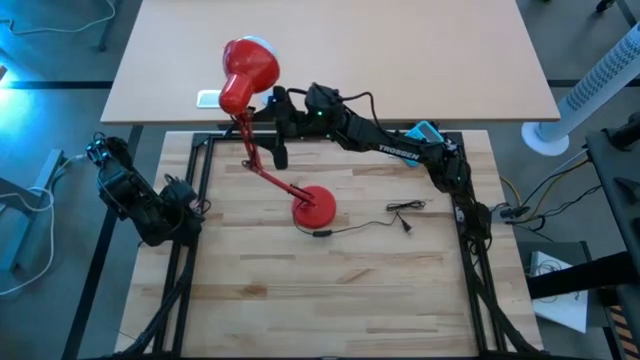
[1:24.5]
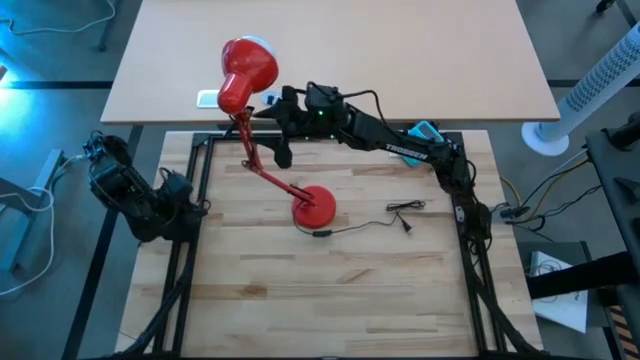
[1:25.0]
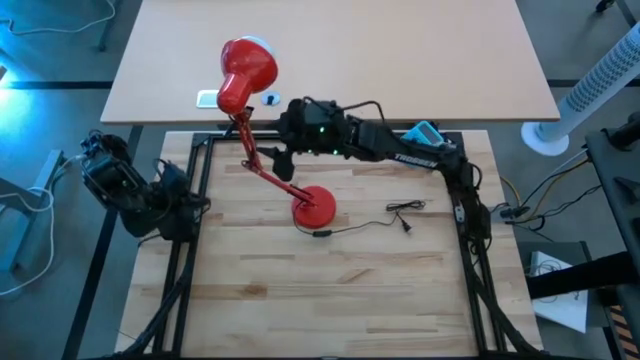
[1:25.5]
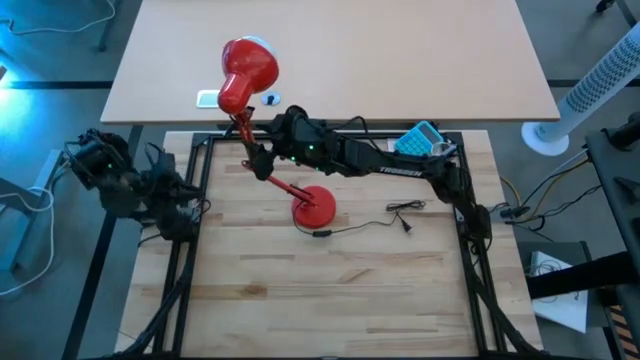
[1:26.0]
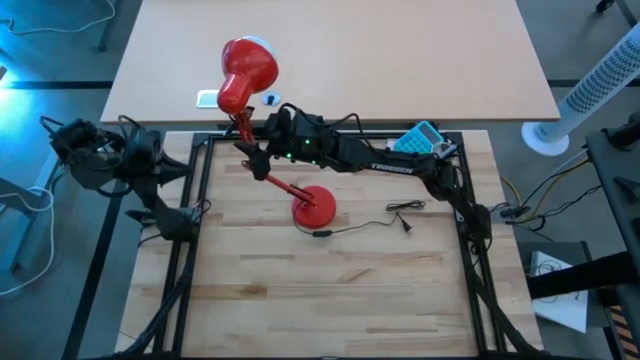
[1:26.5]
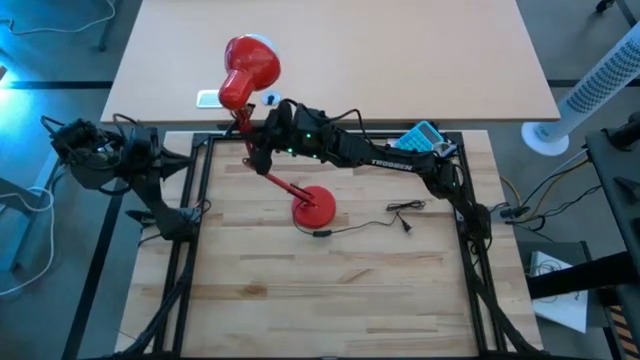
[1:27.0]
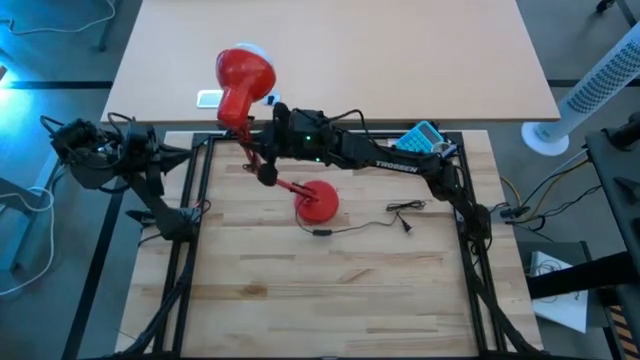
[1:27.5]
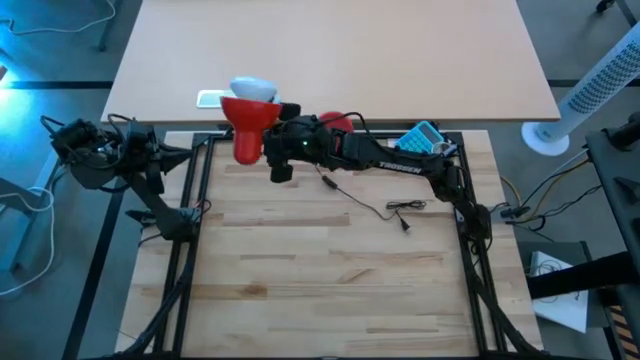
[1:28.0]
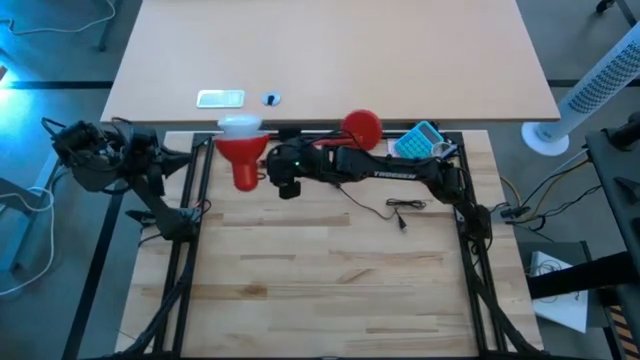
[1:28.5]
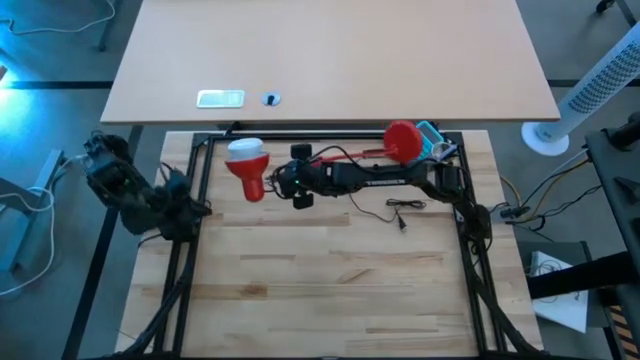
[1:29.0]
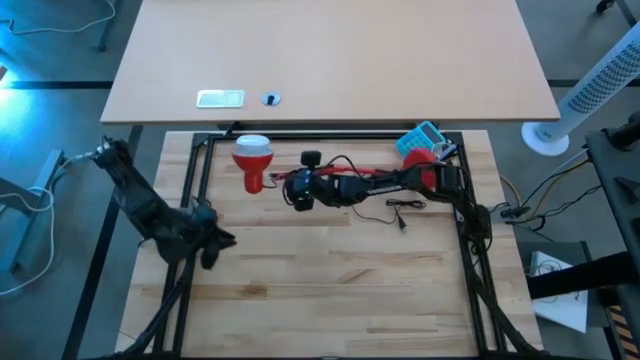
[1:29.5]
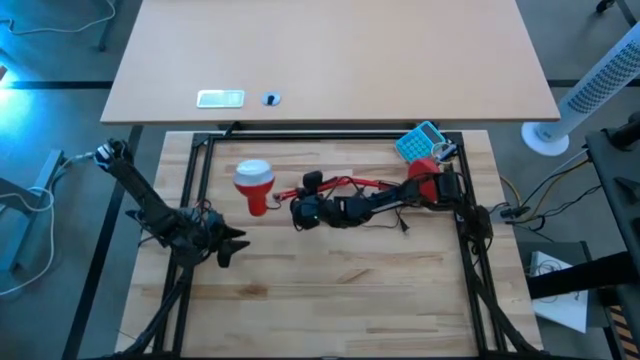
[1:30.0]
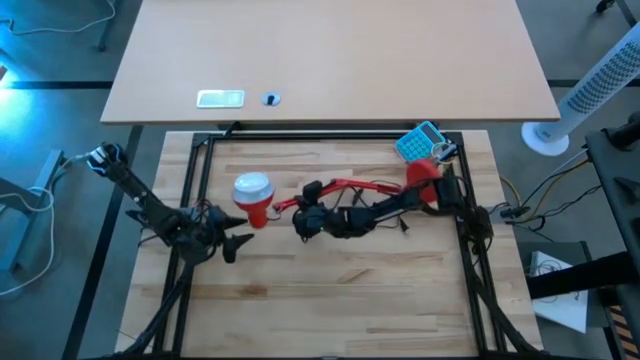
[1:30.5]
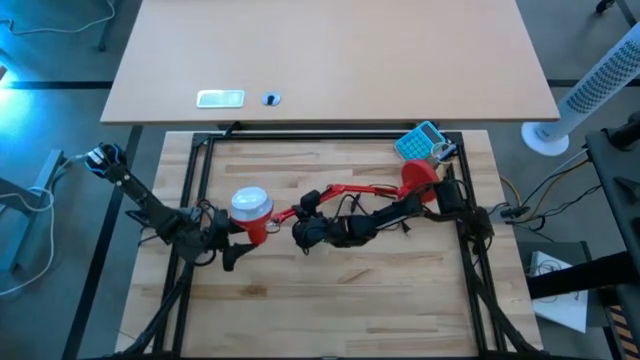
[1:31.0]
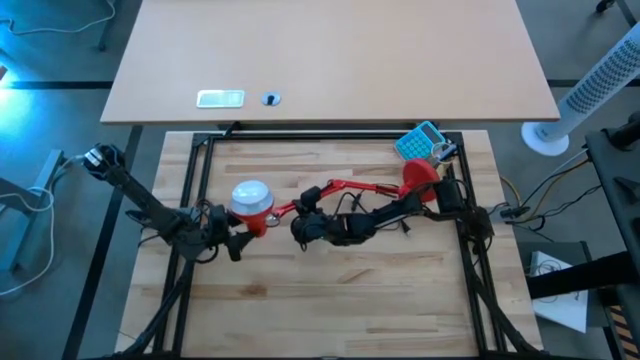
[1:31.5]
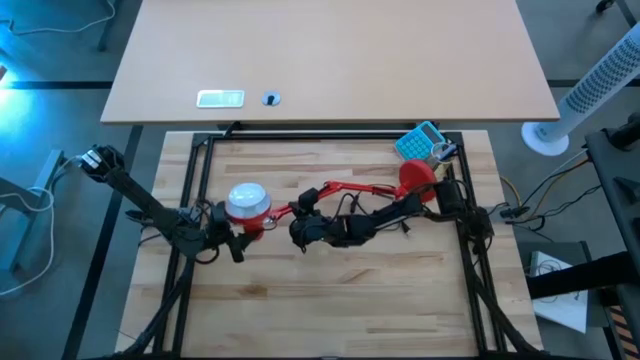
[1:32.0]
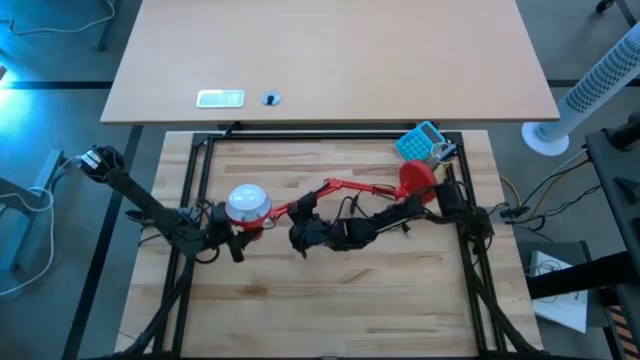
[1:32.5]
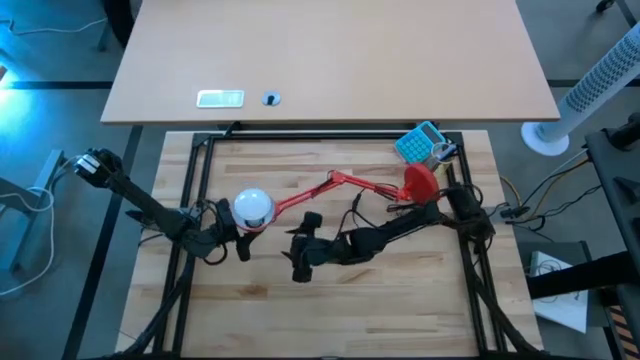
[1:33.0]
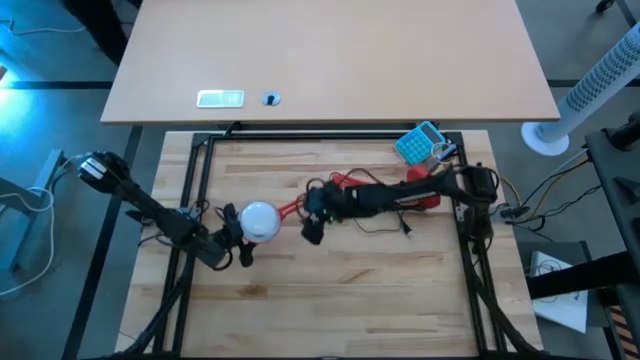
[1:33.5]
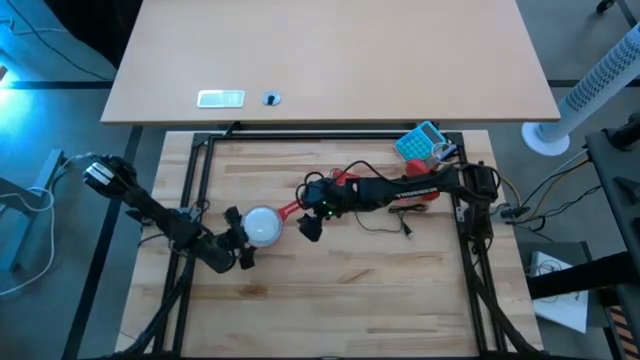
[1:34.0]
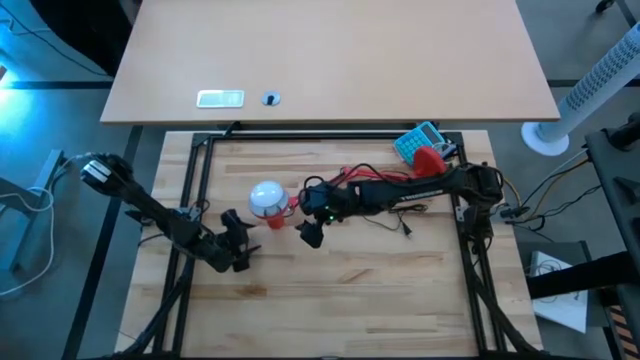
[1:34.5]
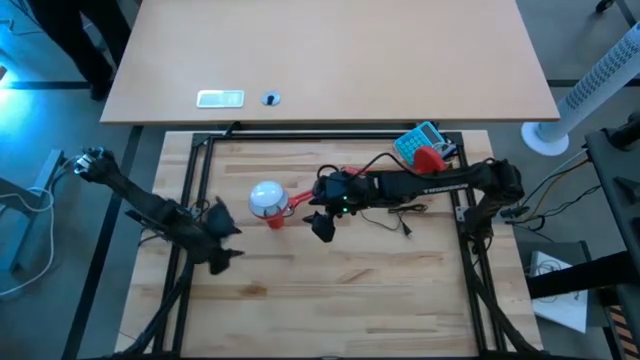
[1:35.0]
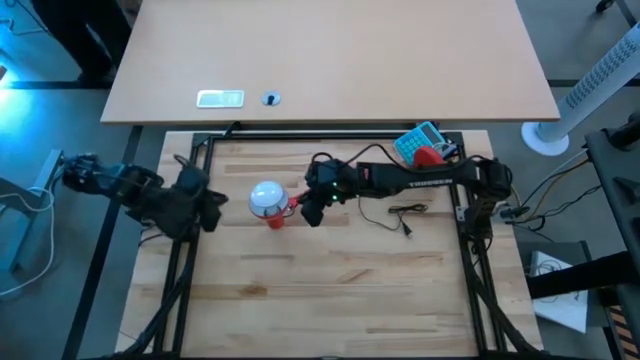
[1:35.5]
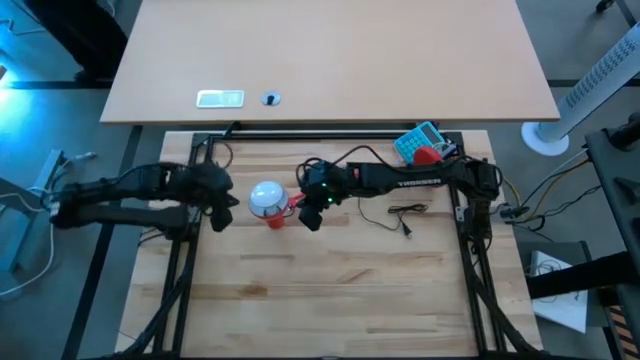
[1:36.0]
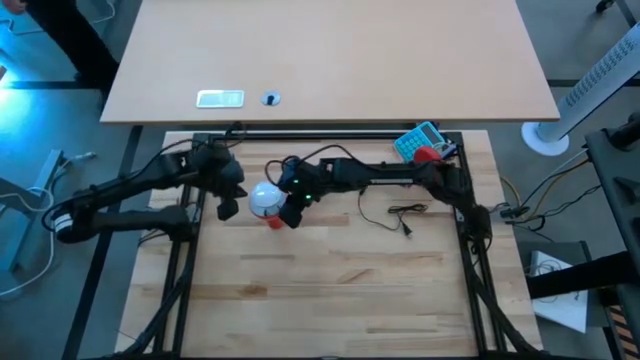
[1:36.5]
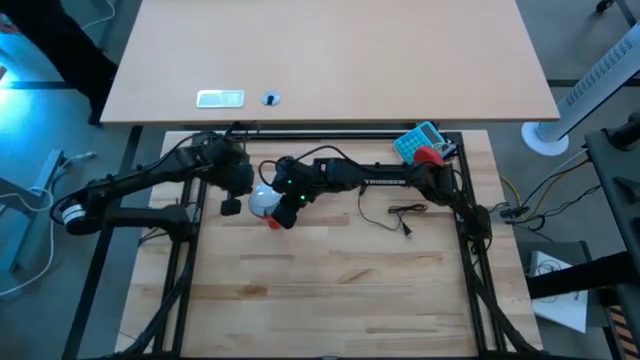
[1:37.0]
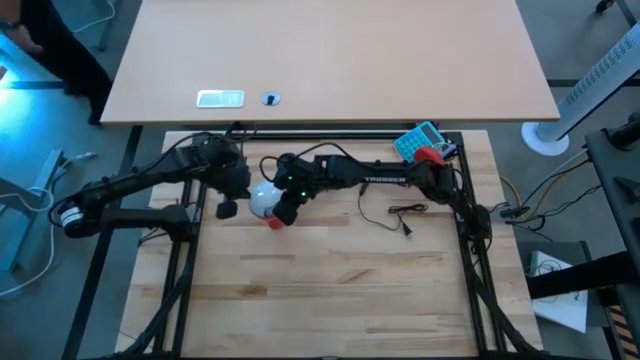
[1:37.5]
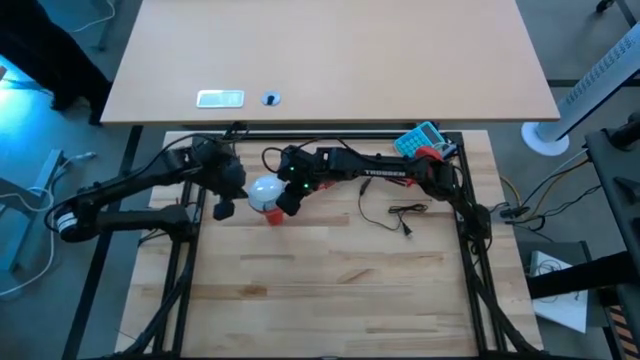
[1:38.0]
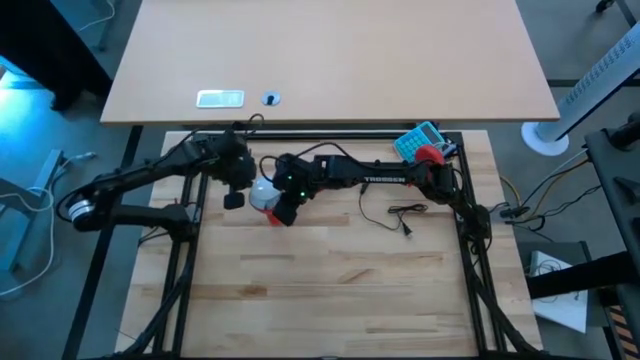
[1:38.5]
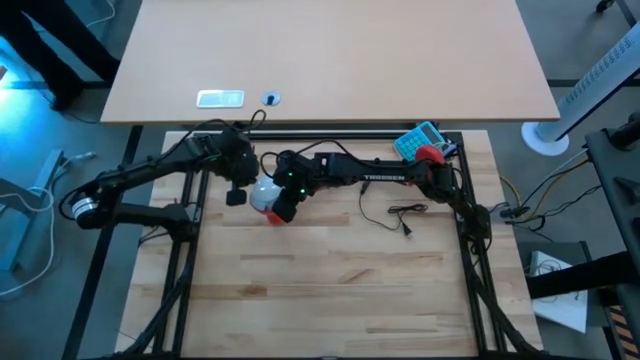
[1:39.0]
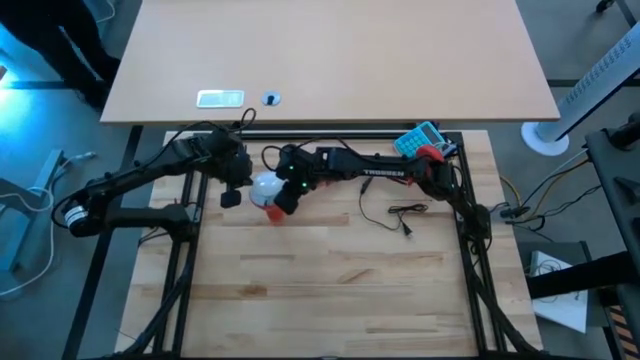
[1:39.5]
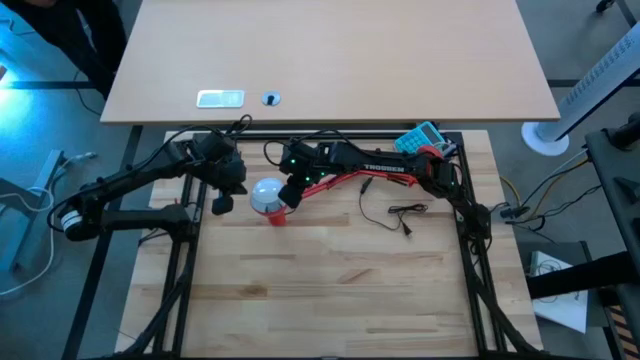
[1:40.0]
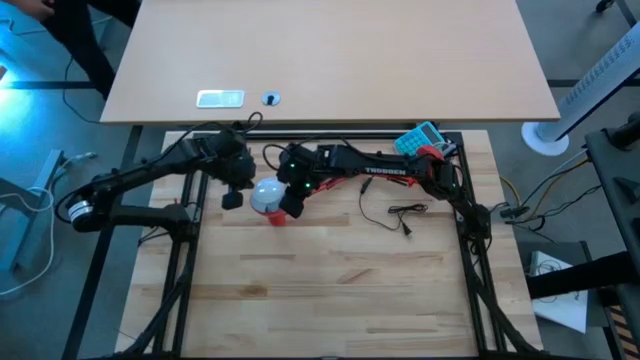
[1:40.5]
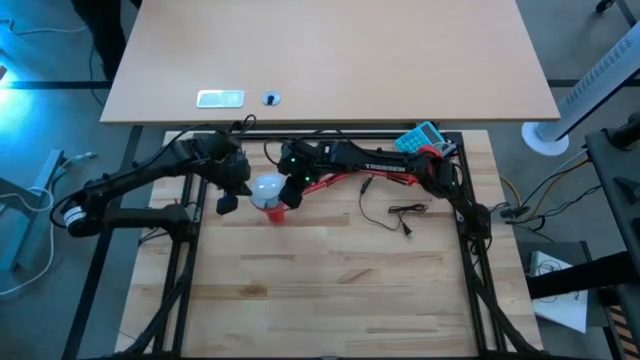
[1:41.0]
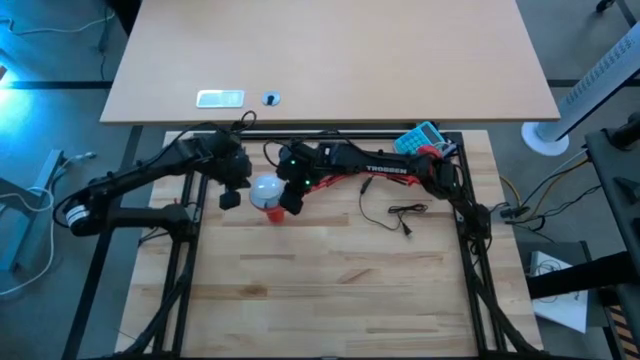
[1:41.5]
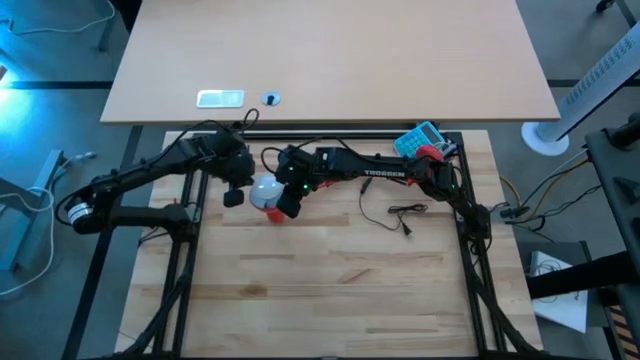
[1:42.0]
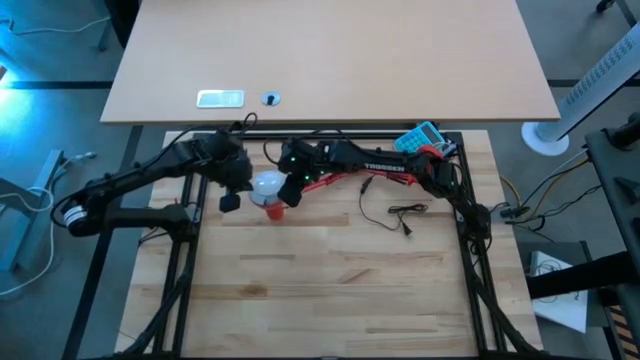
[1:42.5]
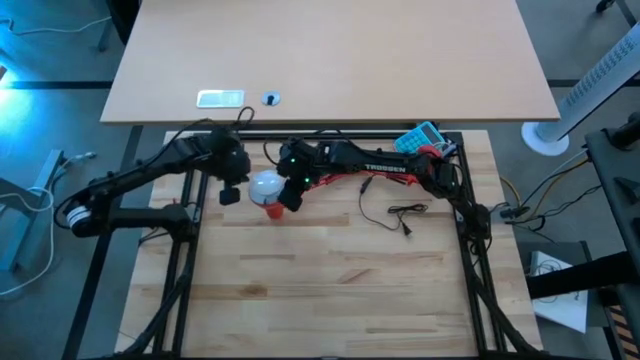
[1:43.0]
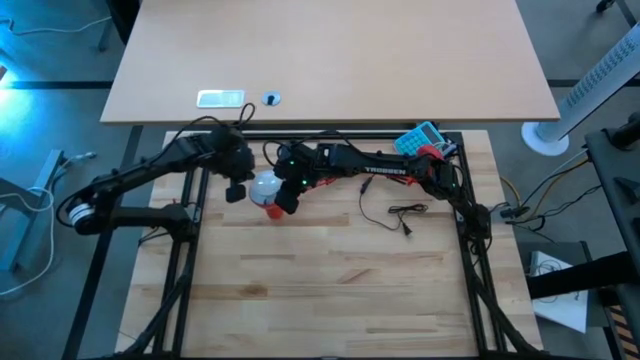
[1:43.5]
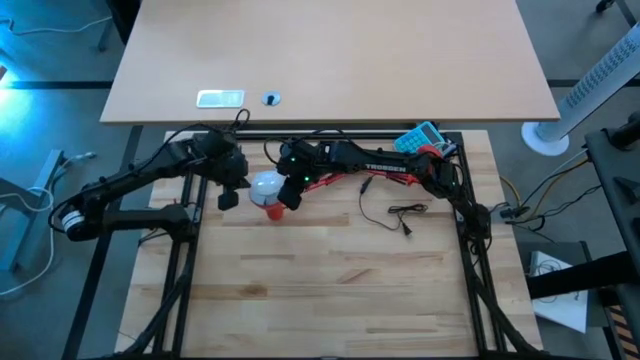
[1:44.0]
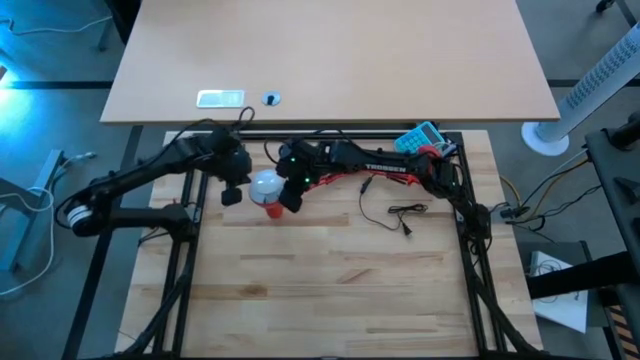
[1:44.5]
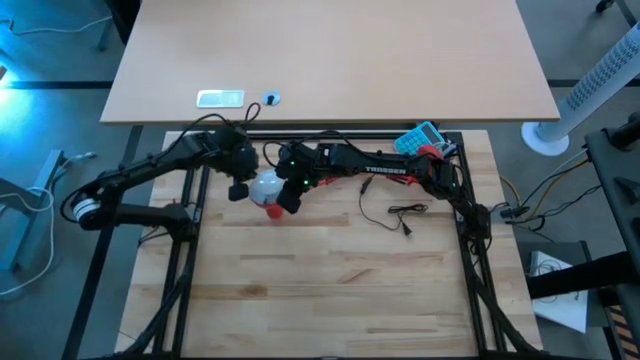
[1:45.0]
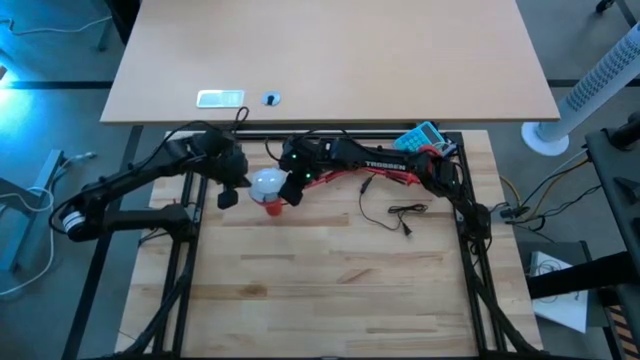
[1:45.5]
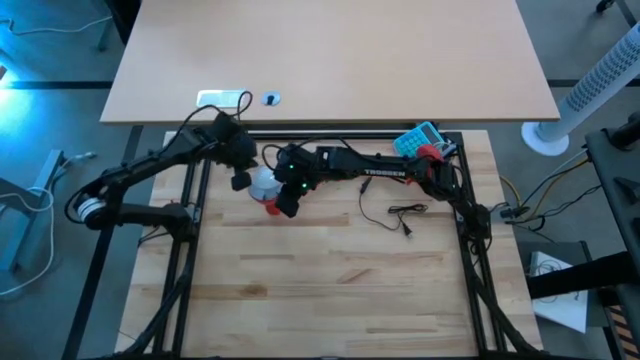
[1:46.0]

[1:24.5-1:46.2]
Task: Screw lightbulb
Remove the lightbulb from the orange desk lamp
